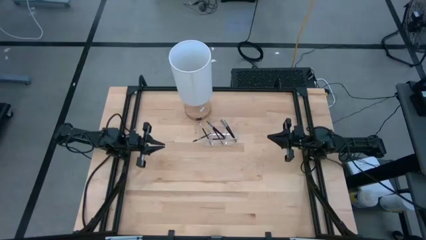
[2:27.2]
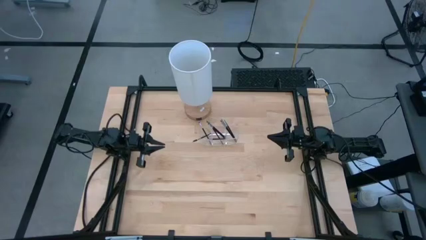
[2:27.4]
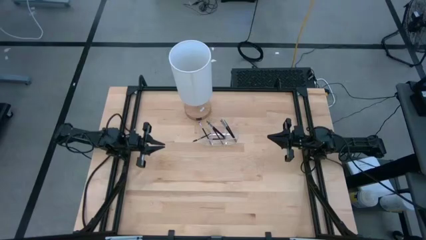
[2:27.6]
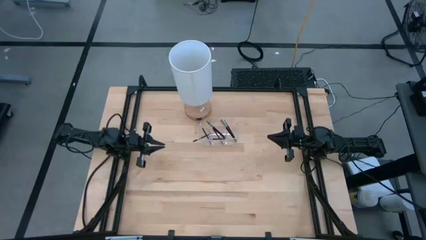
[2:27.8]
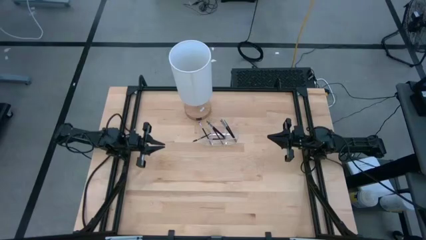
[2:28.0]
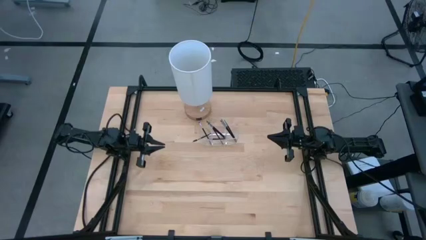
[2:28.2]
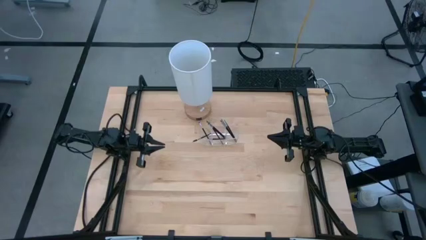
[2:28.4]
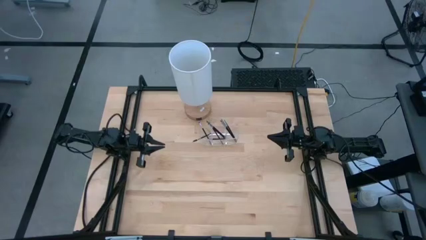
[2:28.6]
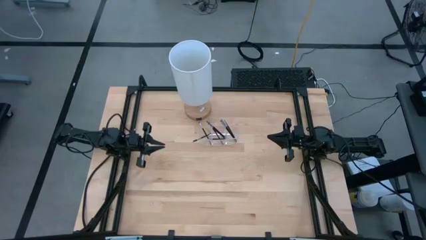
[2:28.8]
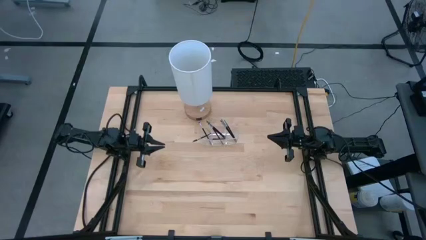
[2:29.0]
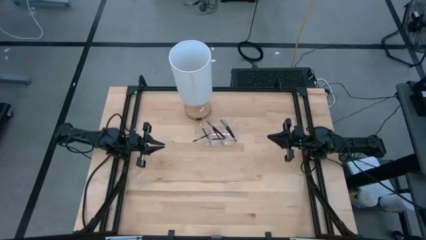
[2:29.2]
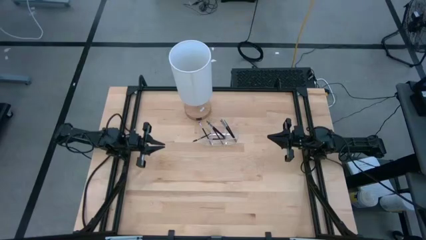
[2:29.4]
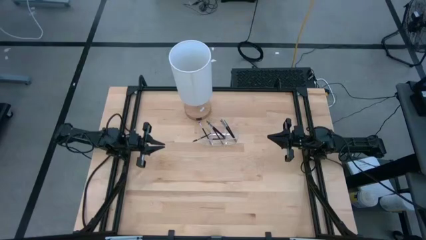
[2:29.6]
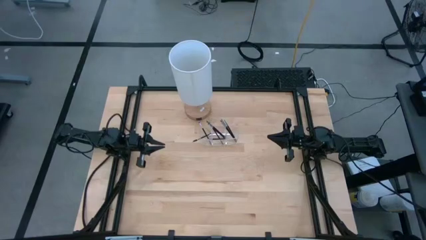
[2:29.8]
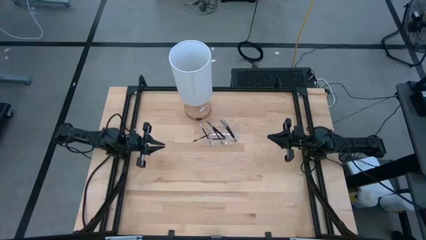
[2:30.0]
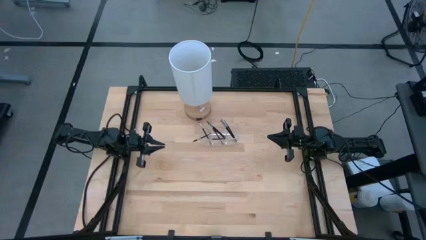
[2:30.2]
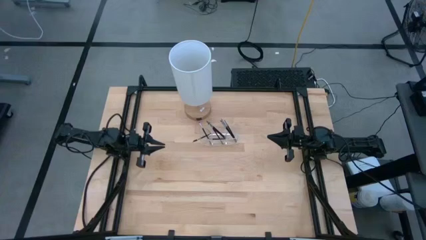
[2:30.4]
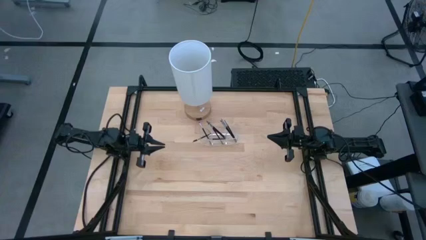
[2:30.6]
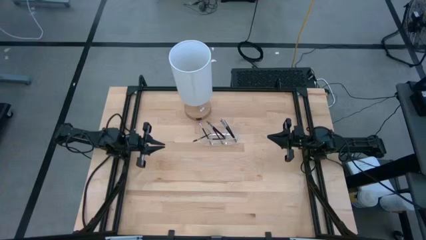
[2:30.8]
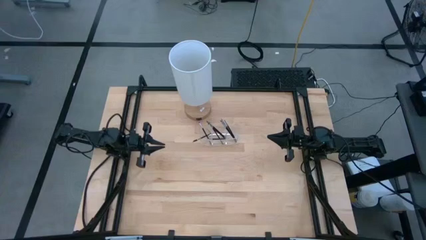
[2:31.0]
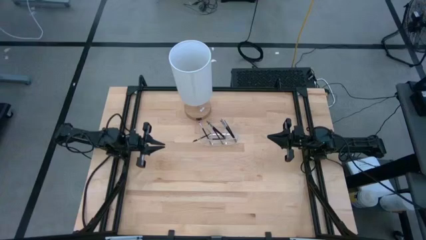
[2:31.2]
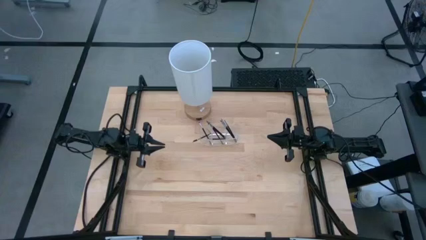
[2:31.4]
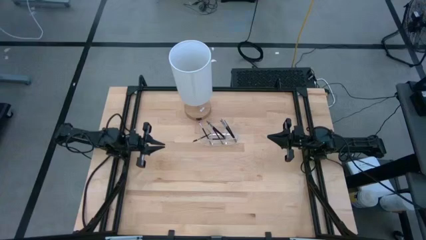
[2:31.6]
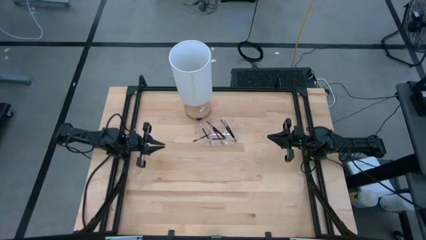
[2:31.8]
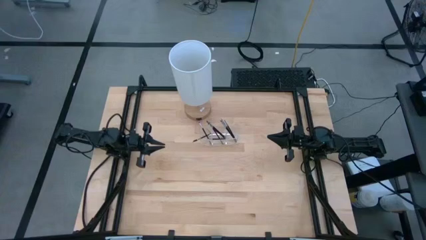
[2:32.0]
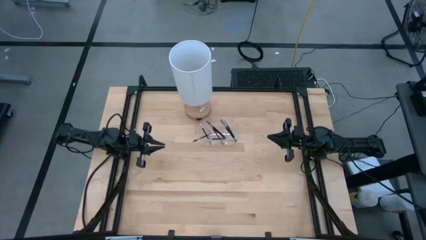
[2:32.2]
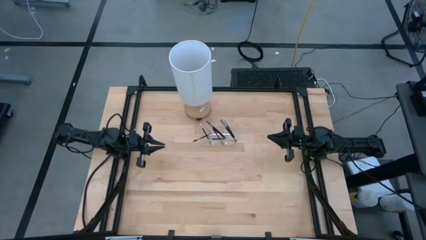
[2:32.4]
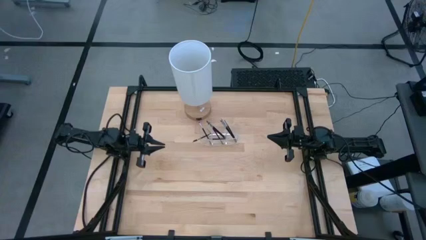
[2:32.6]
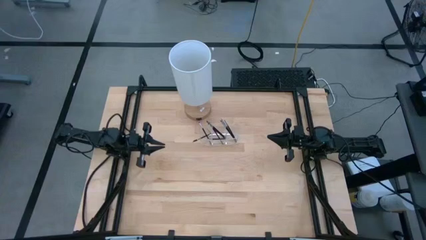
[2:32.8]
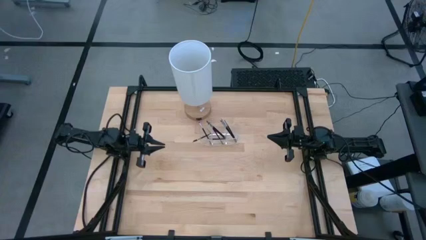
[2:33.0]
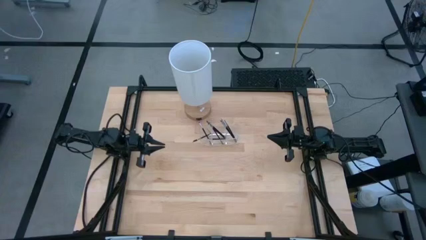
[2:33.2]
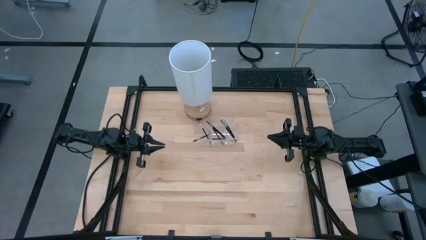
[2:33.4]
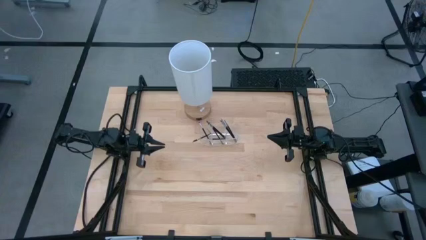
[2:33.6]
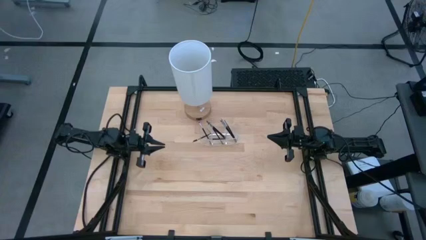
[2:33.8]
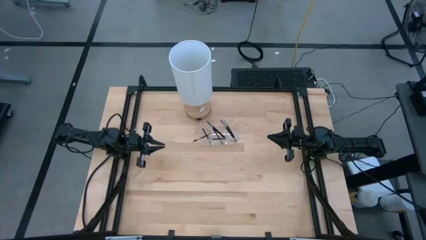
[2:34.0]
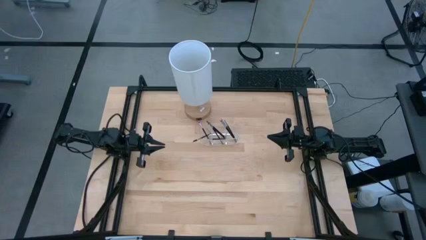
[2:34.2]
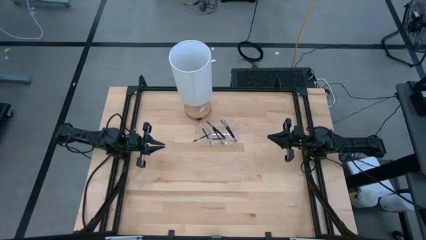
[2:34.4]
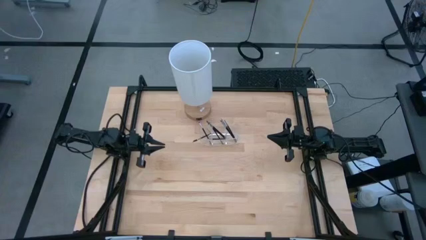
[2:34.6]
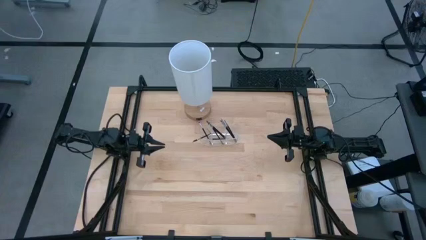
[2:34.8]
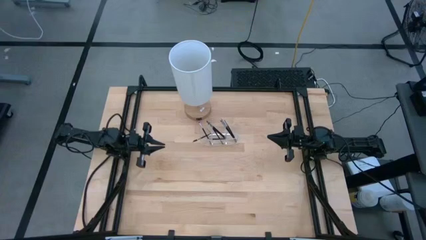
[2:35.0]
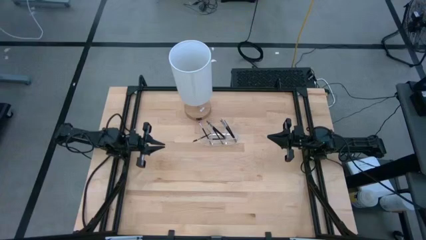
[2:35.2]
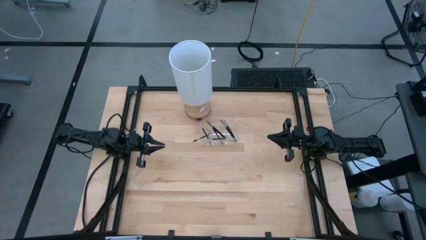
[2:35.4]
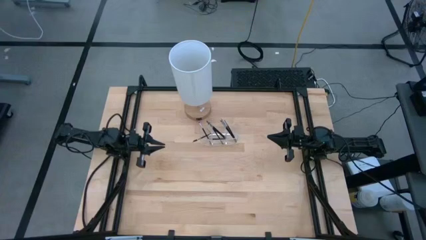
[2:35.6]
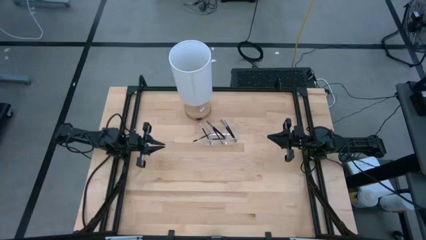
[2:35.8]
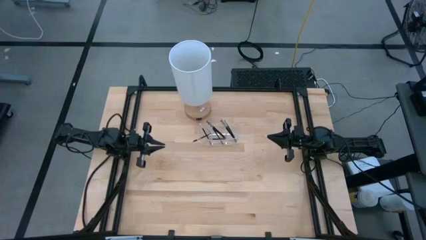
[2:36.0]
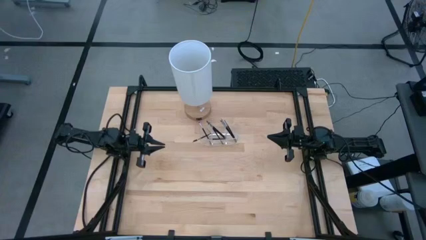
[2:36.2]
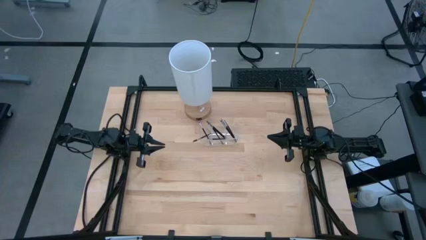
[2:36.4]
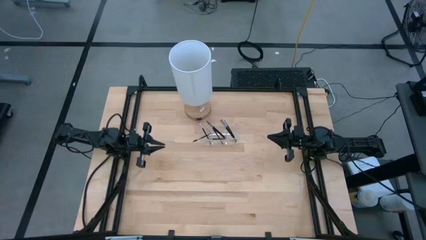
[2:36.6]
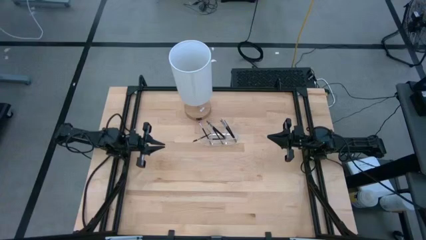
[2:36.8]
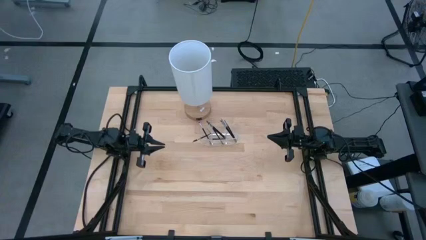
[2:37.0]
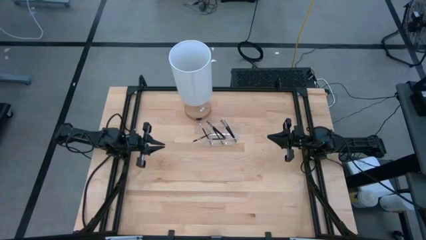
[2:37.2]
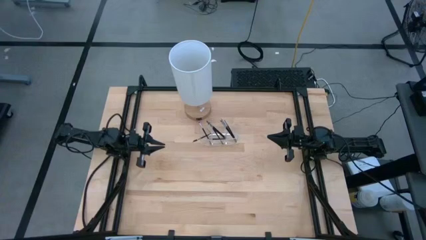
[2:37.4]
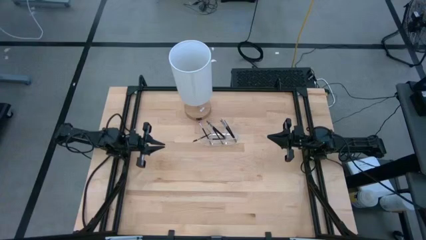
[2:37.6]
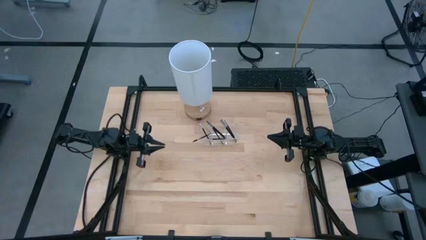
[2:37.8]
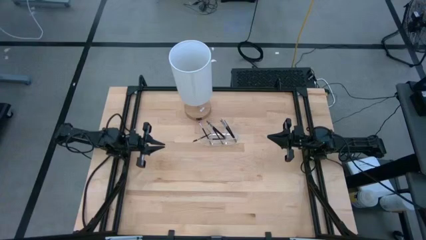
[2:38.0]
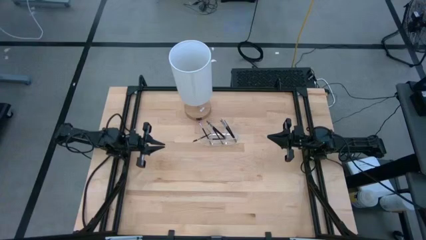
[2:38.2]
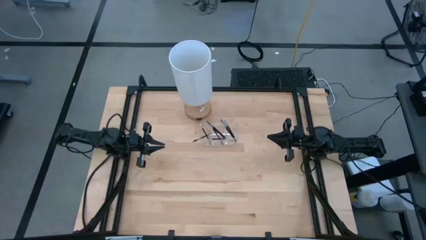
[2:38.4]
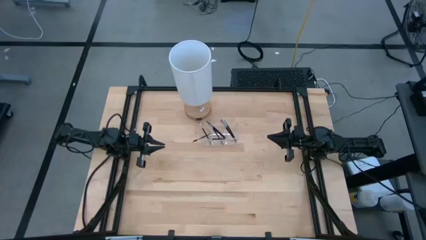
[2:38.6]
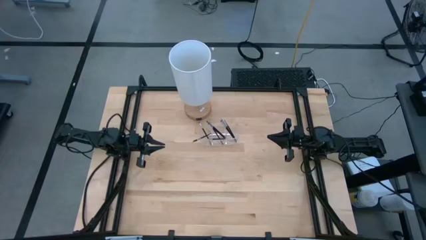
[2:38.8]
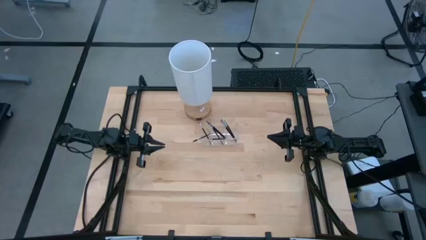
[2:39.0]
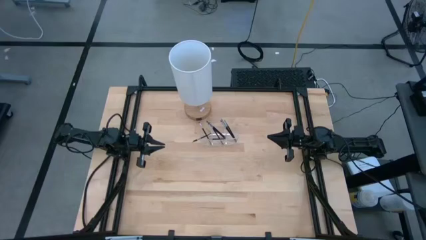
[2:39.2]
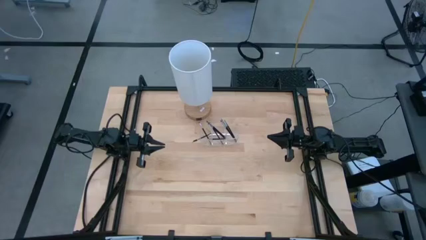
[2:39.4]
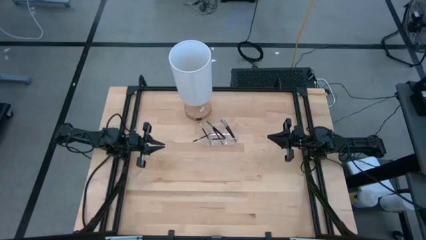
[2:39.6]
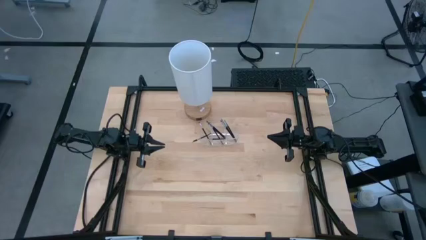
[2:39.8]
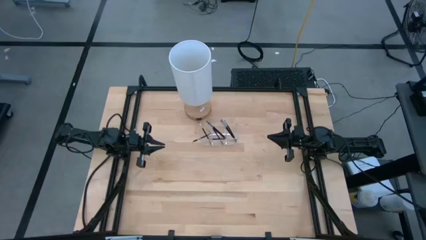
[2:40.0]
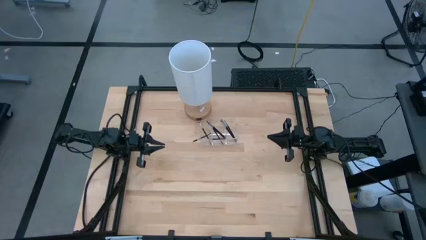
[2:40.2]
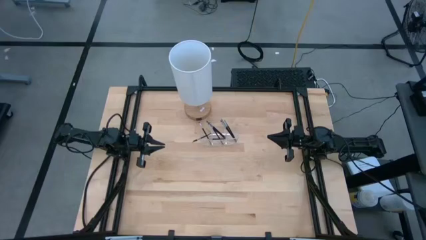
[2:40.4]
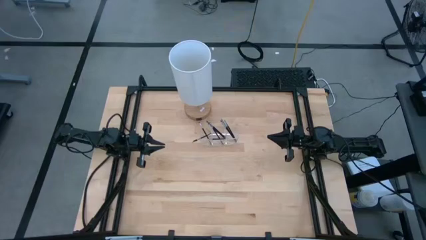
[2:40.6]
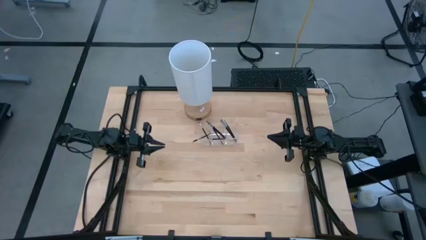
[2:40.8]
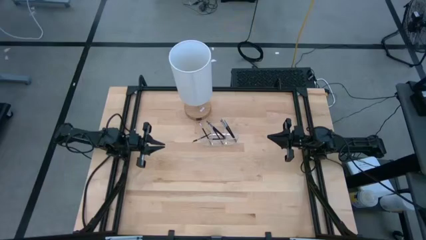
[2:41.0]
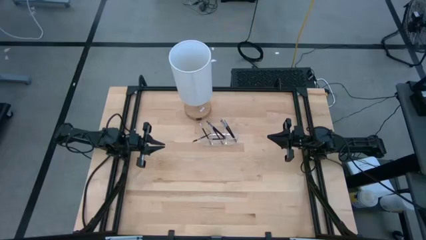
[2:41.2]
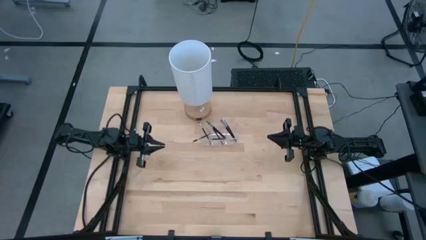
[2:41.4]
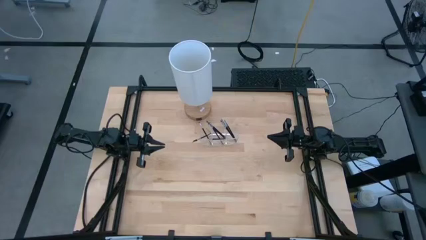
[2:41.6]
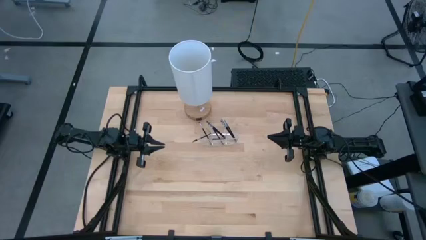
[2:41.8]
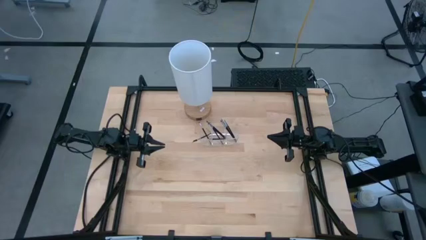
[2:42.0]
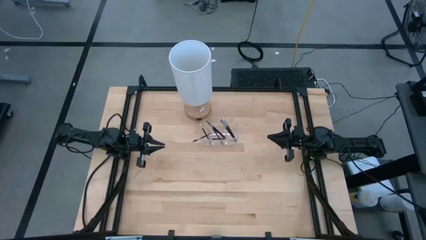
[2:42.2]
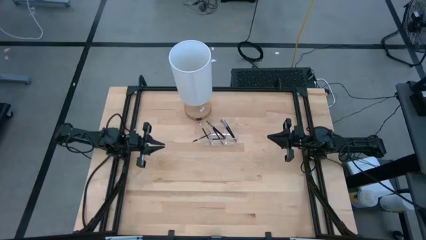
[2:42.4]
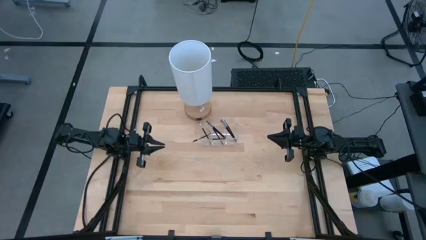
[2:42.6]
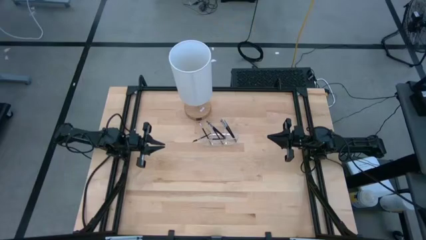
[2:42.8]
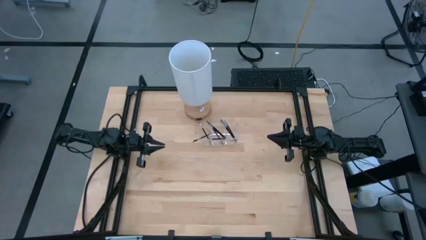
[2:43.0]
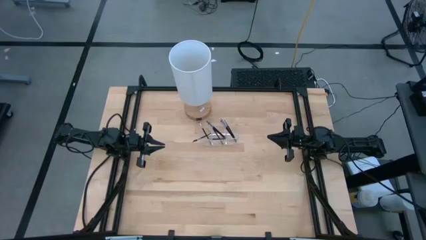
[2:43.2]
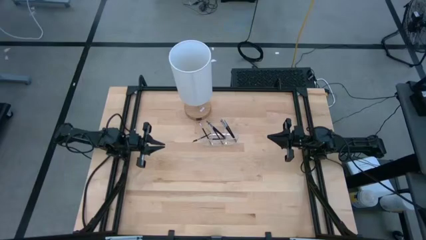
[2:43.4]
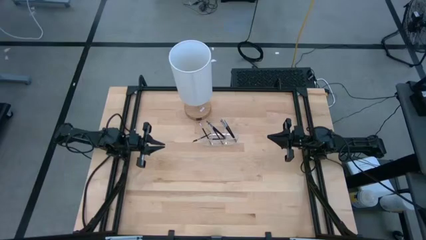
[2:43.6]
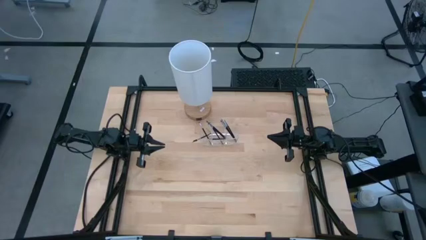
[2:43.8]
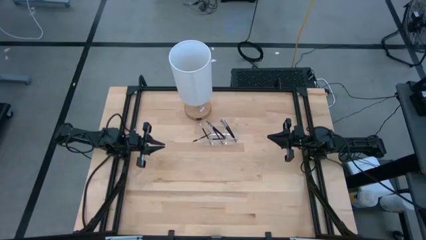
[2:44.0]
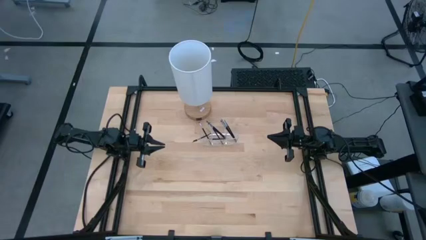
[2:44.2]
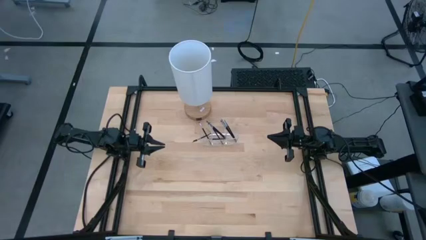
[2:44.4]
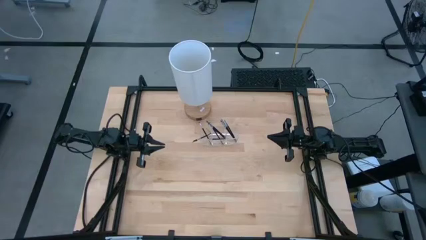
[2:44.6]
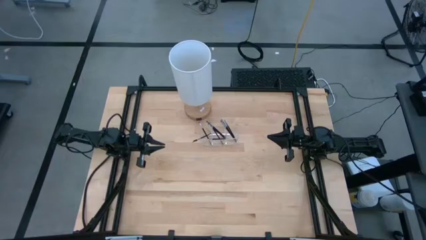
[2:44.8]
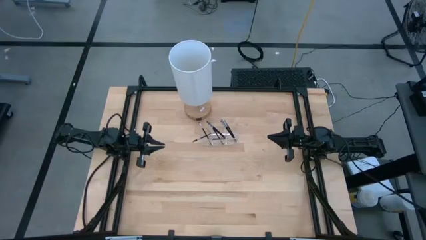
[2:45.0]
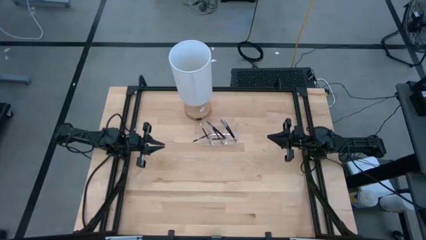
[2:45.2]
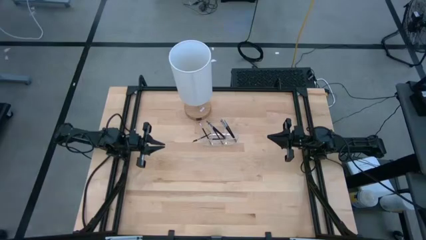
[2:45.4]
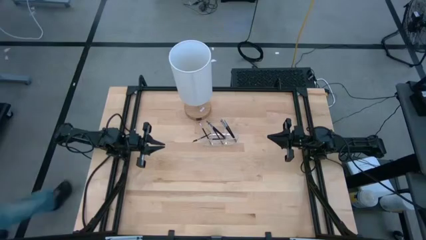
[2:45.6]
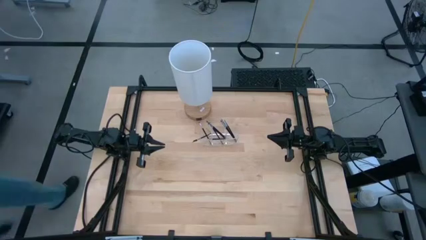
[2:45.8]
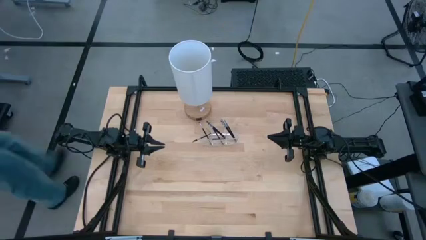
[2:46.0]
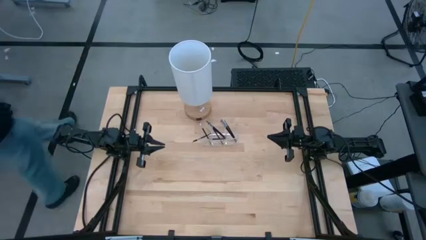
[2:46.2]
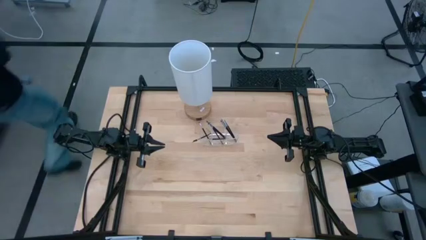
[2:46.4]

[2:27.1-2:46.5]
Task: Pick & Place Makeup Supplies
Return to Home Position
